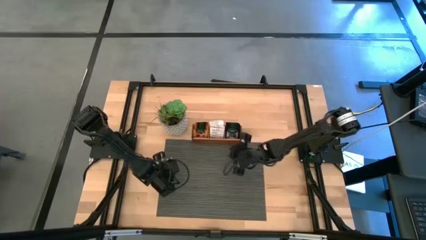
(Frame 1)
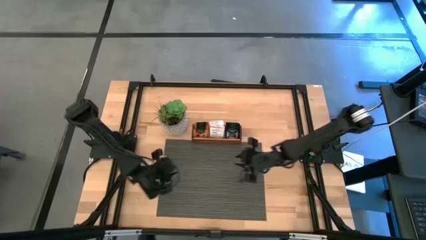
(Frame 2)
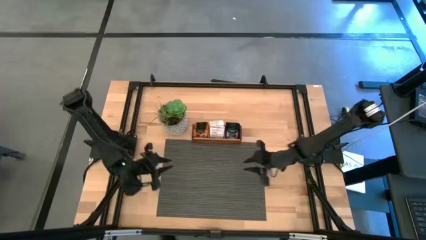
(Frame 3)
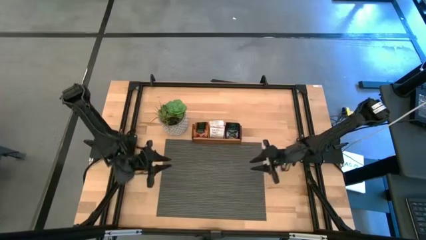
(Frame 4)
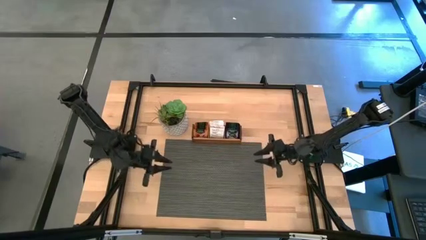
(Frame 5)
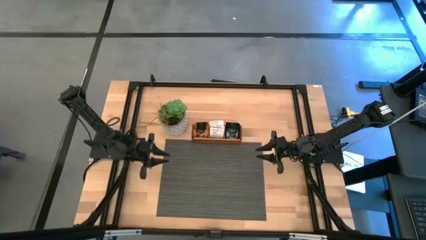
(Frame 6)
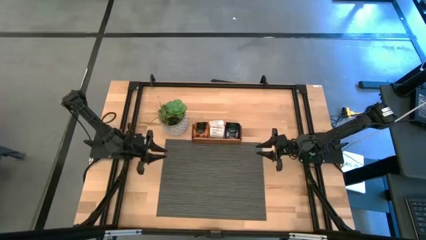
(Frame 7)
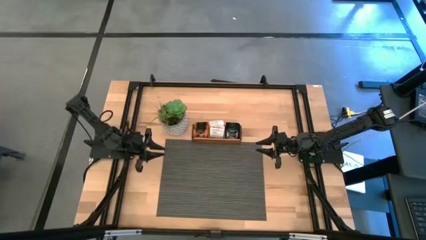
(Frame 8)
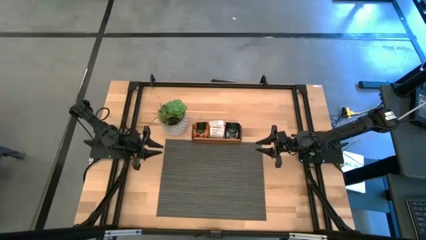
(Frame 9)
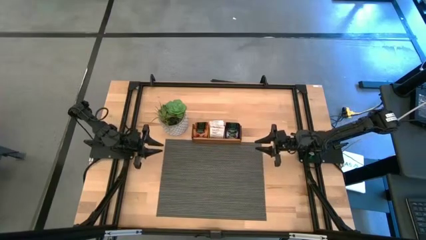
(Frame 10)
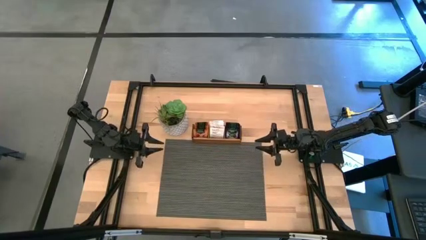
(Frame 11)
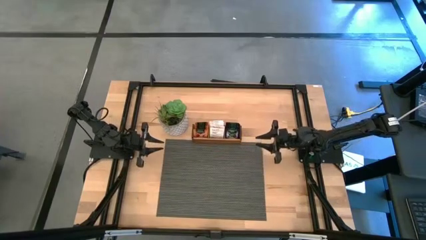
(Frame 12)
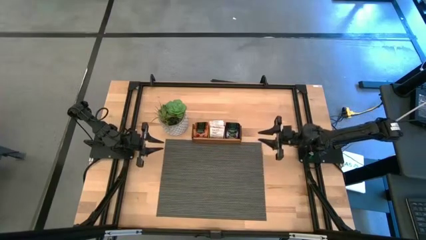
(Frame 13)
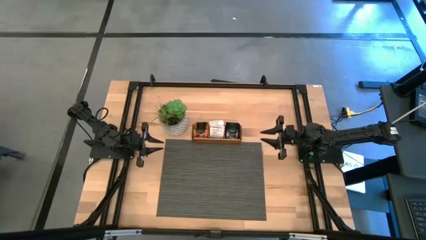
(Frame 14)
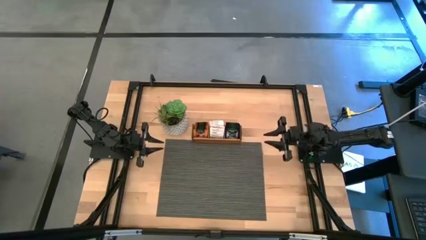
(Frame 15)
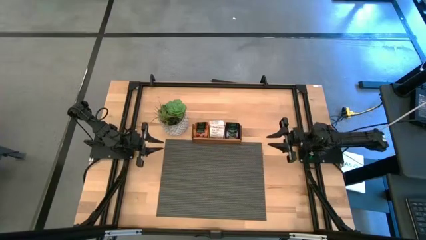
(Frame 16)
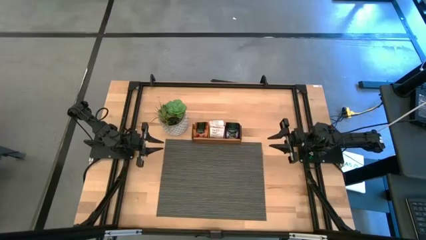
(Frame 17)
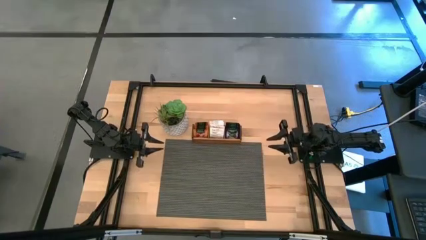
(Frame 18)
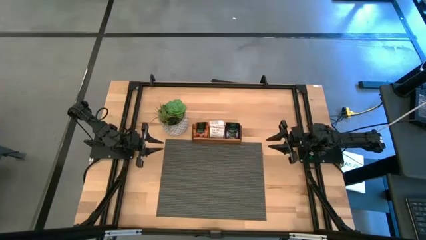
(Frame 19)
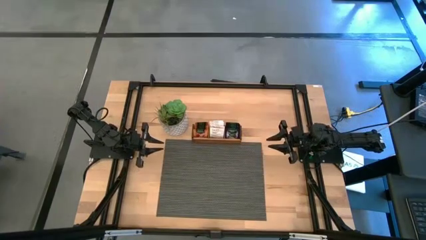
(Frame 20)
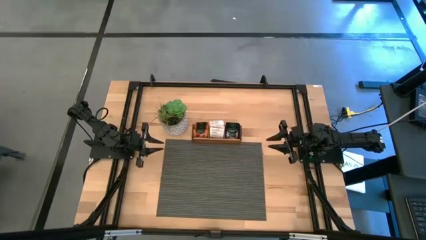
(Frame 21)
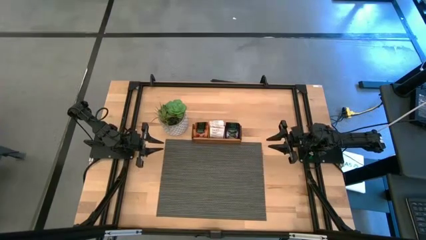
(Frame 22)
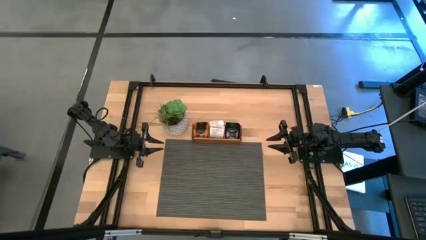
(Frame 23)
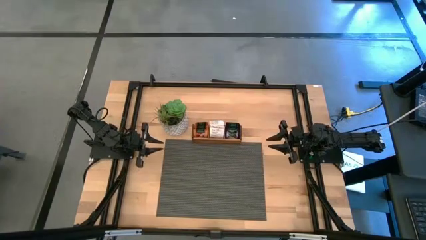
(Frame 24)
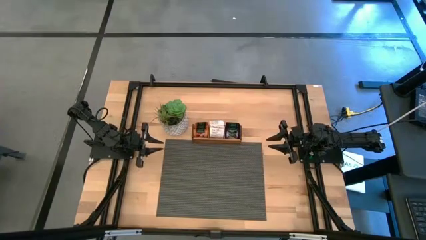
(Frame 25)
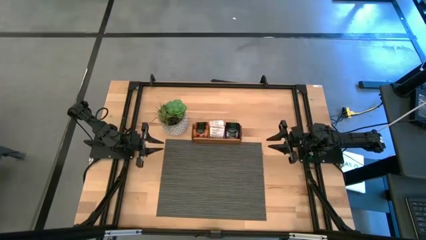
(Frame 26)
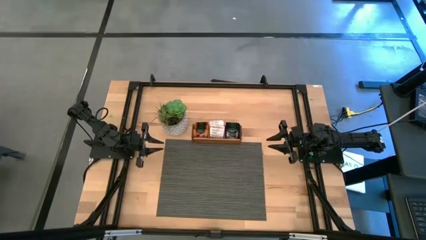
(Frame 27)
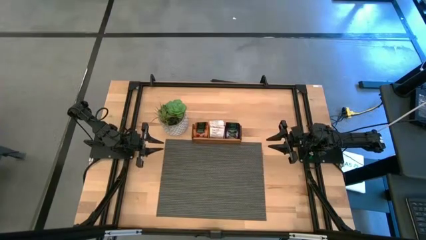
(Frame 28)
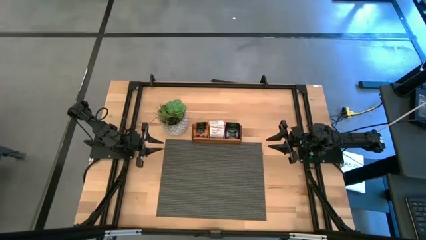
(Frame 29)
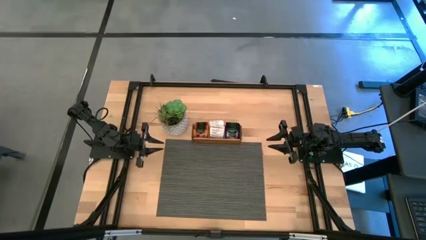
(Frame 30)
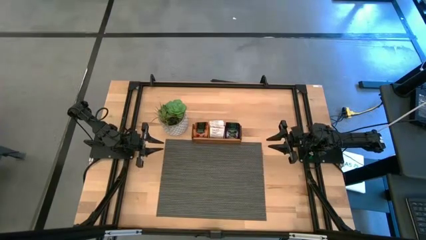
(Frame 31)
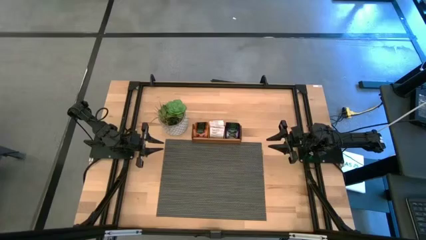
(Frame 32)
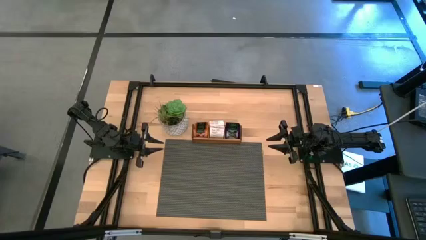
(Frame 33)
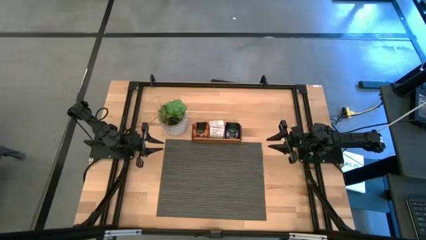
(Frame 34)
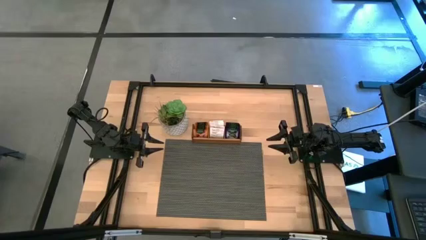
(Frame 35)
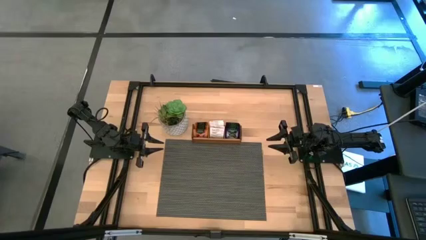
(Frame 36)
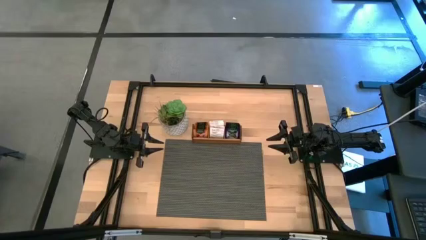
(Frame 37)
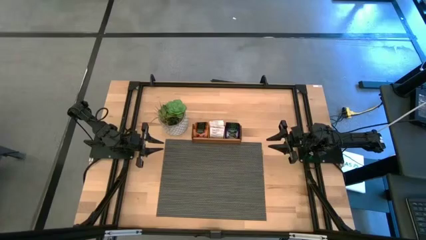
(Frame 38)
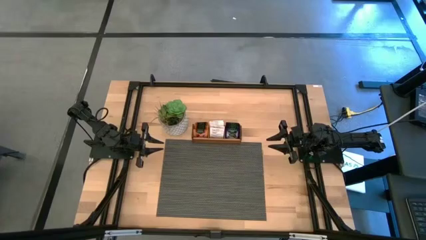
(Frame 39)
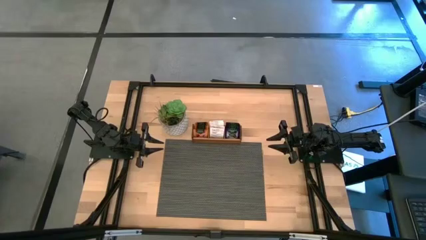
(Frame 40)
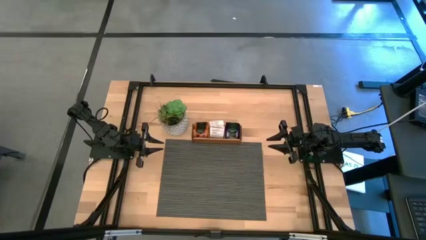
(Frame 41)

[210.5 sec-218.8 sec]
Task: Pick & Place Tea
Return to Home Position

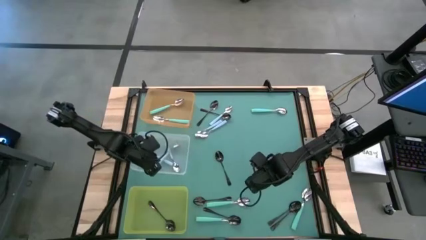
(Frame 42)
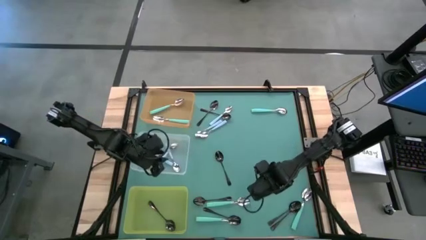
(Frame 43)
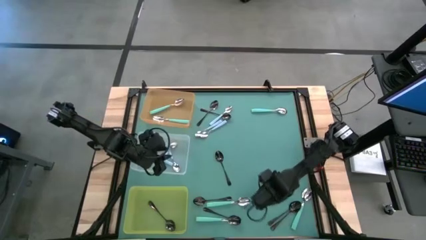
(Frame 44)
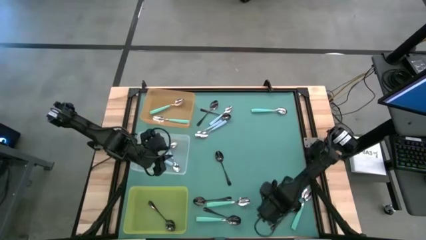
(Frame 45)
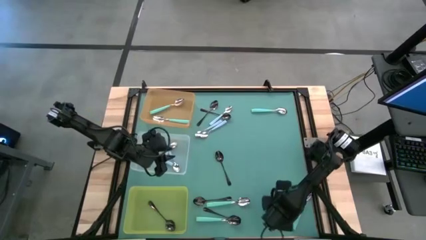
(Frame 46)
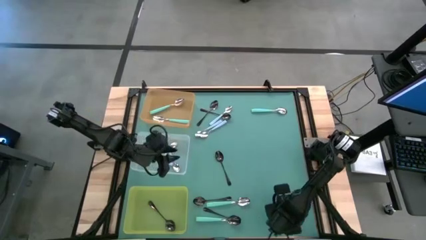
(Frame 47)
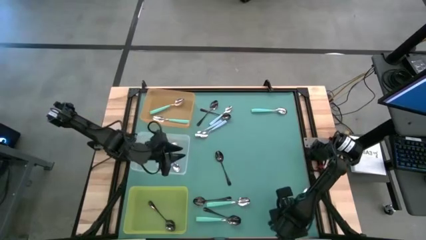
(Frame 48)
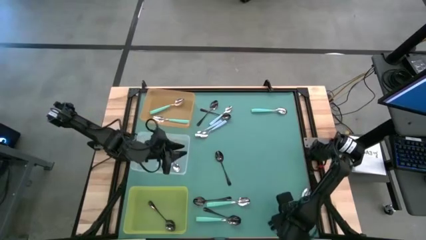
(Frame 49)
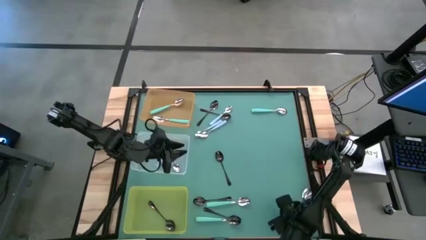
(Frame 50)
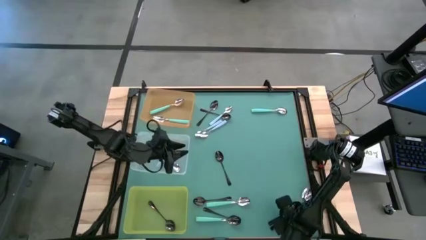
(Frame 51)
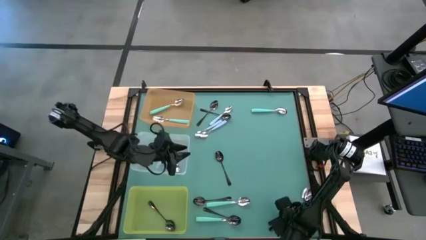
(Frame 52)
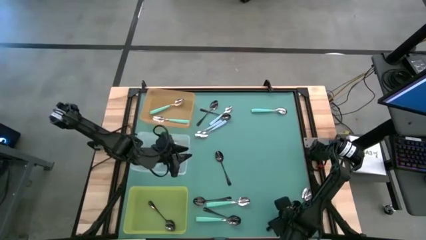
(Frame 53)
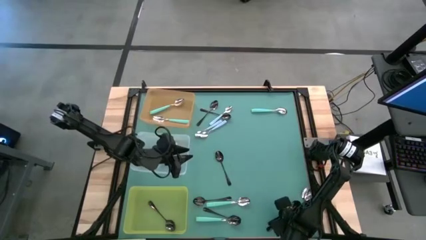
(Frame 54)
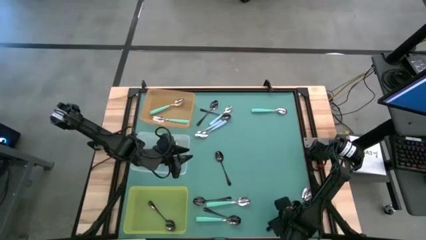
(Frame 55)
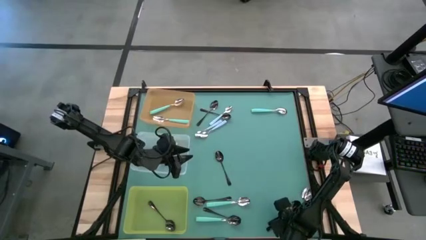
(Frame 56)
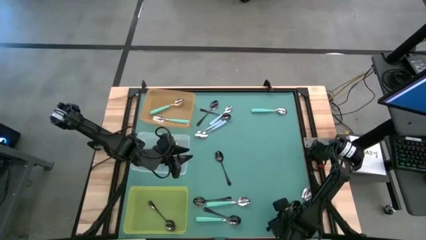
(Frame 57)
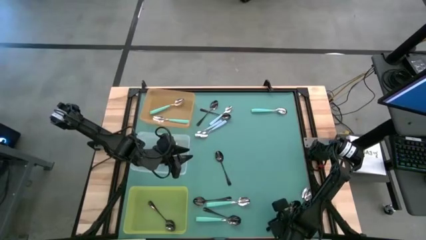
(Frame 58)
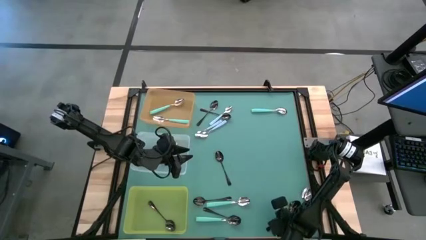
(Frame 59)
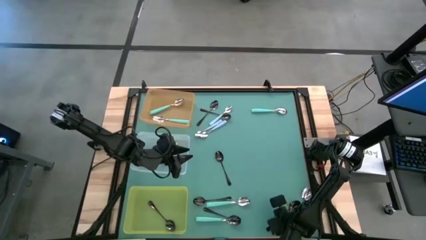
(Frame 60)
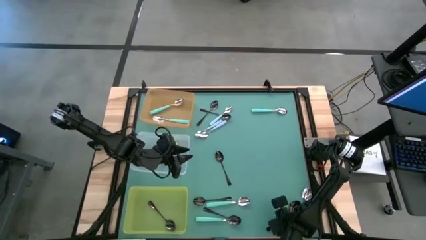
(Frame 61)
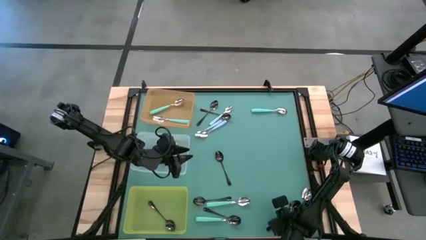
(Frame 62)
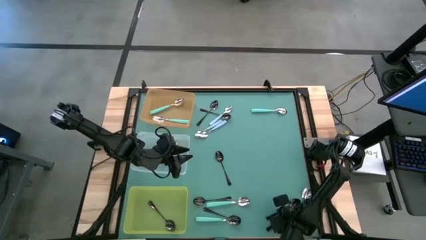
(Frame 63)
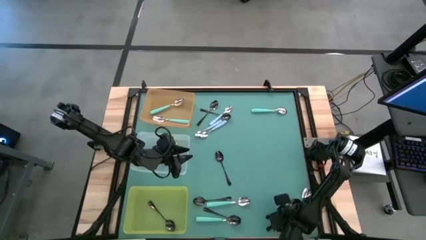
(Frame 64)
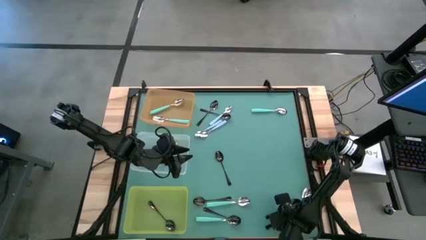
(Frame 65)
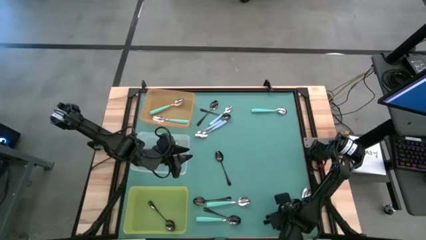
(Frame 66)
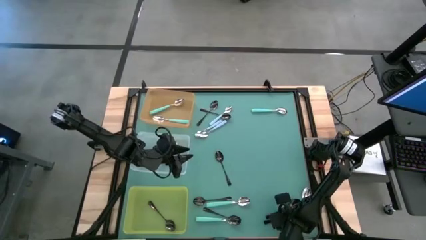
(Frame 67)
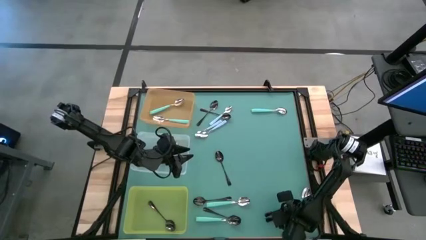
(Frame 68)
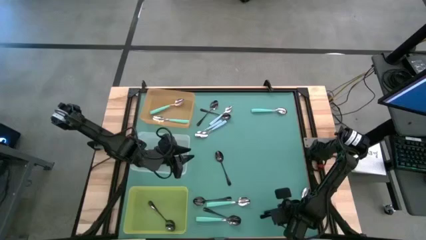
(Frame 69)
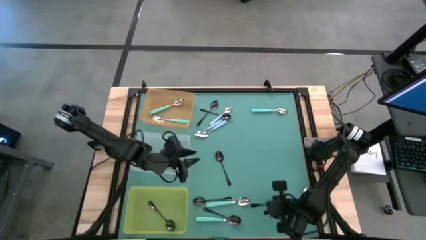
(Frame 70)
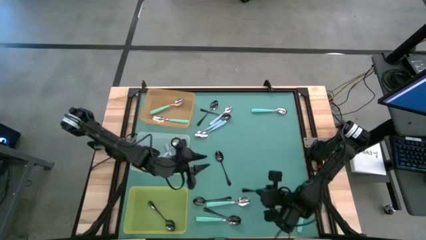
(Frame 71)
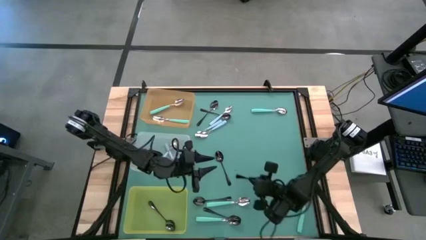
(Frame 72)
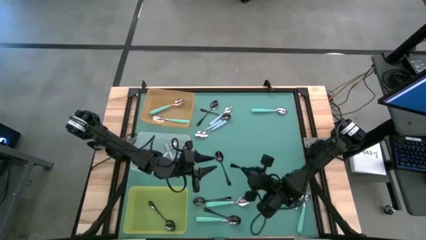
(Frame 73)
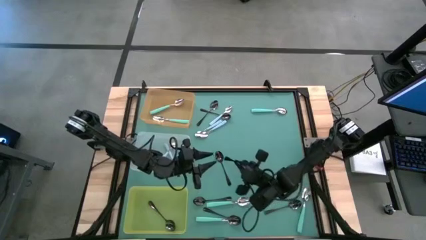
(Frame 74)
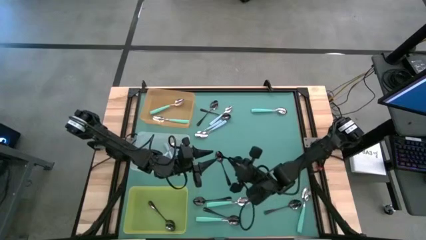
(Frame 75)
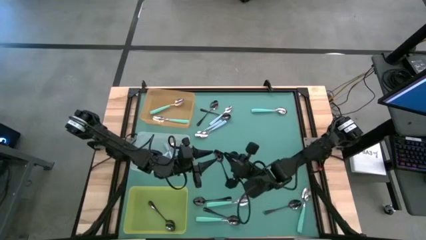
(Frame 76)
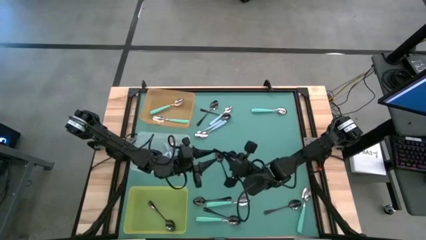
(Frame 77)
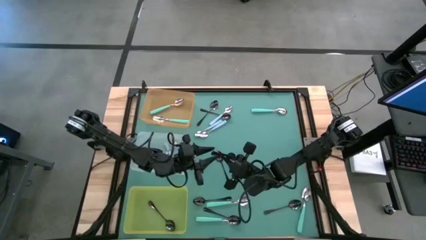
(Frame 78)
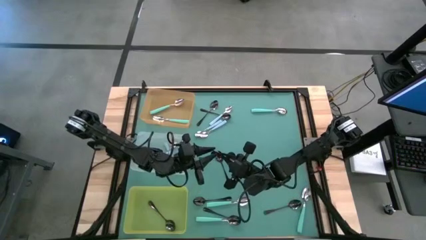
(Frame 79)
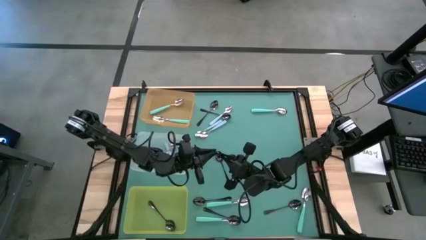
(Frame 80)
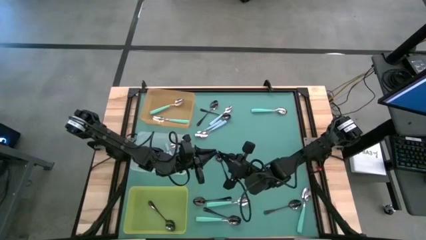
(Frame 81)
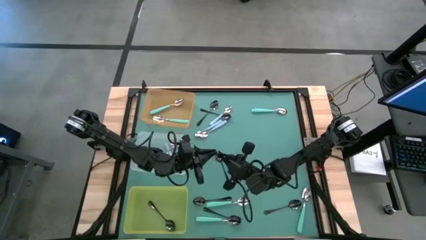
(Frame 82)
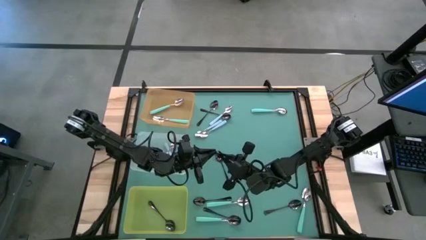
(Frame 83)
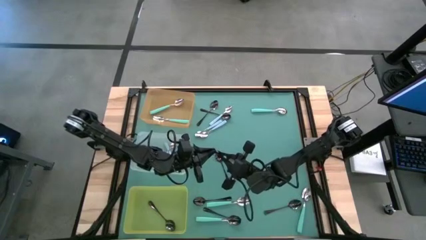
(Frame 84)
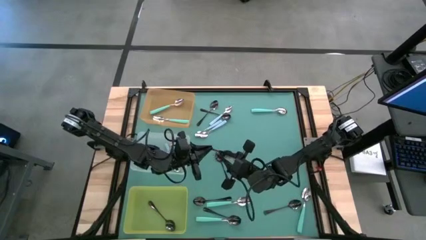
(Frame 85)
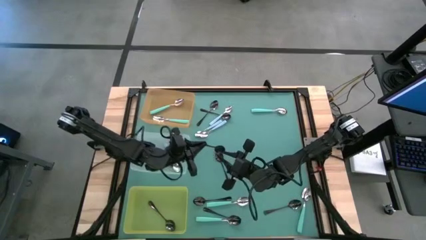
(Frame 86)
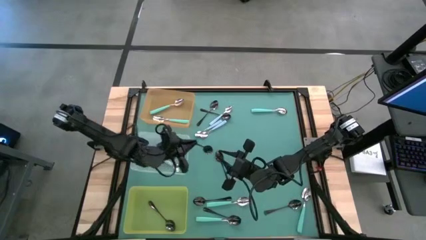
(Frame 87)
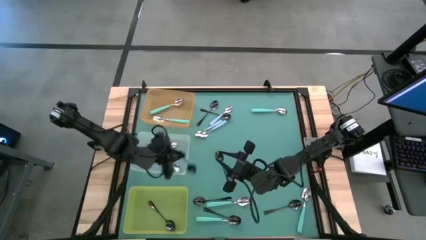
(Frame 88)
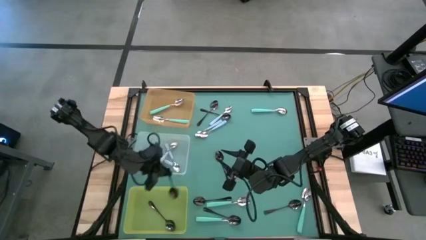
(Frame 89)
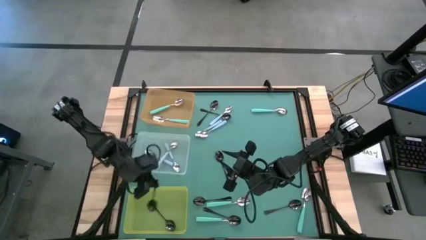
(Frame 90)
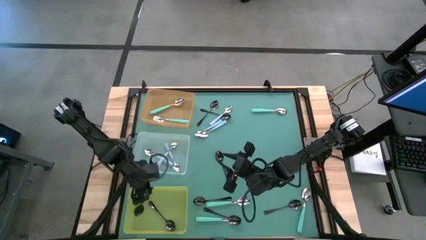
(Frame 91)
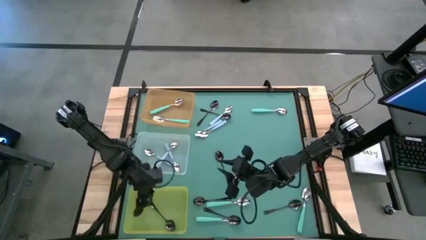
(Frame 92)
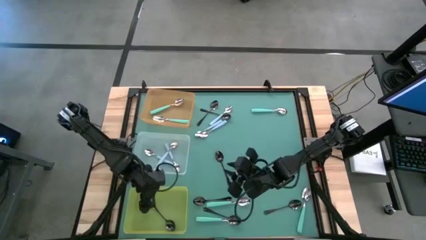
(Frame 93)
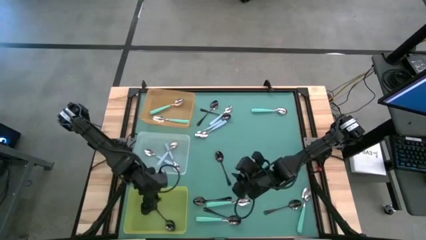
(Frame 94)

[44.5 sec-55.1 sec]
Task: Sort silverware by color (type)
Put the black spoon into the yellow bin
